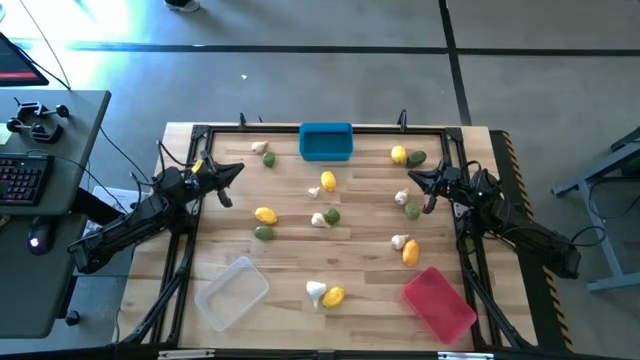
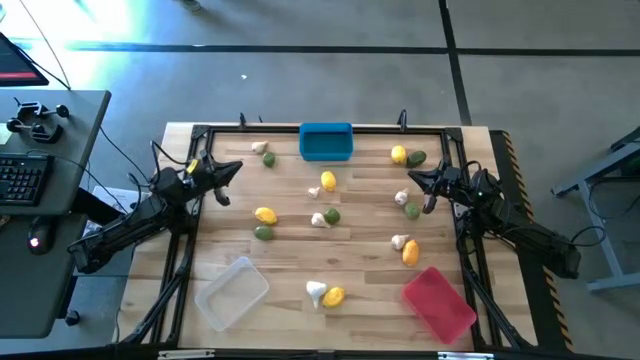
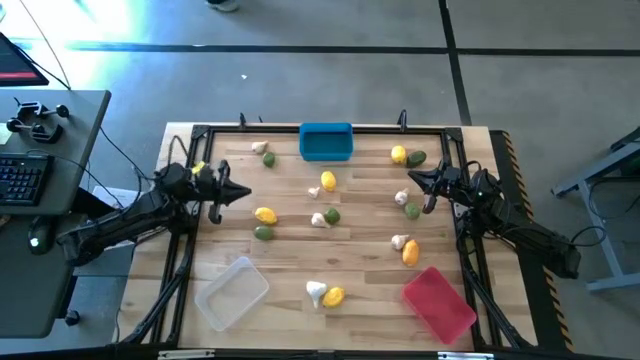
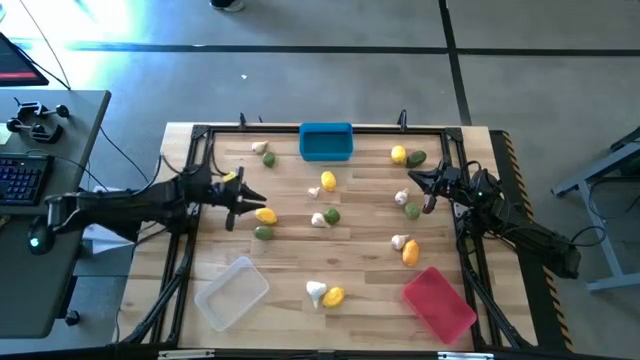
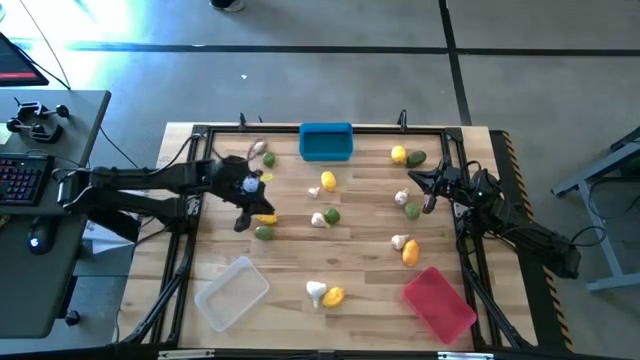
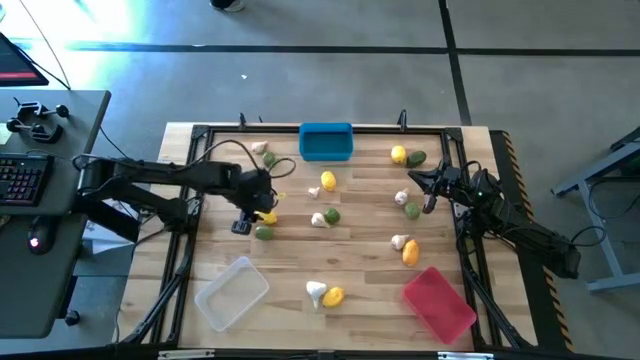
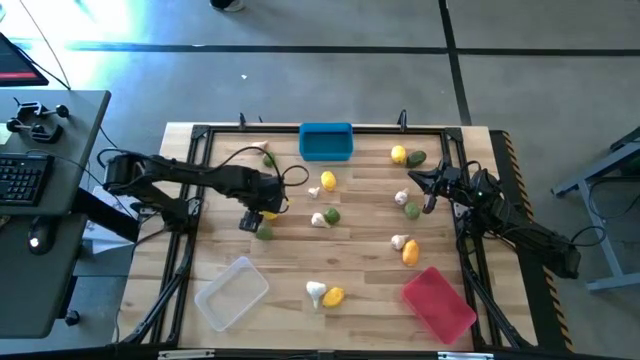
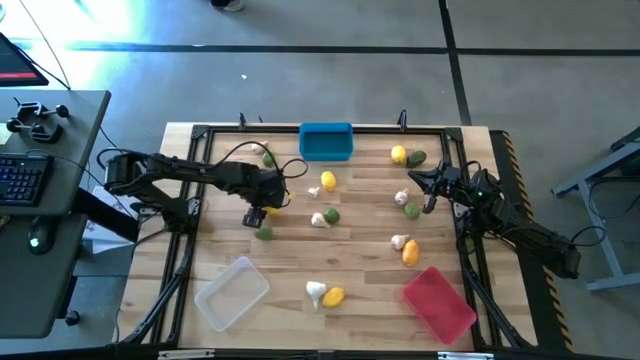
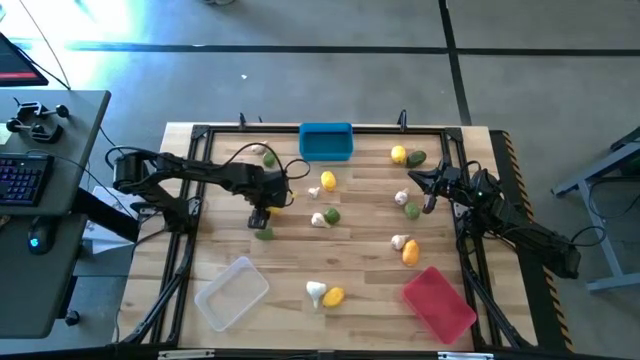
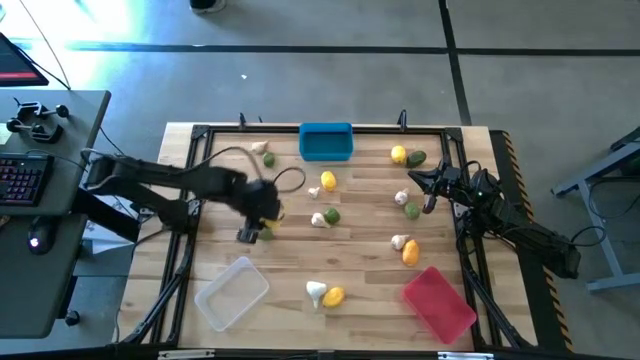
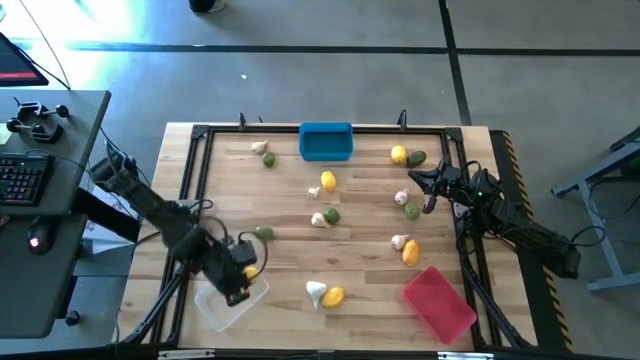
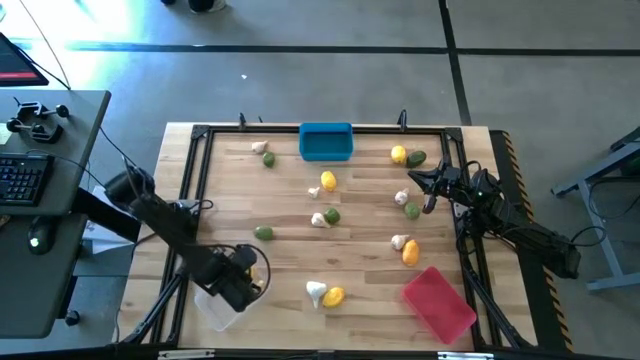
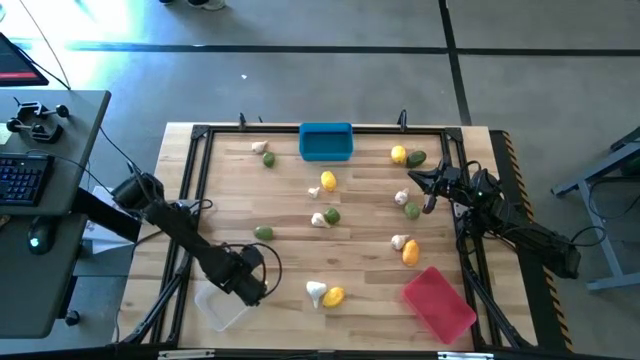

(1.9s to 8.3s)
Task: Sort produce into baskets
Put the lemon into the transparent bin

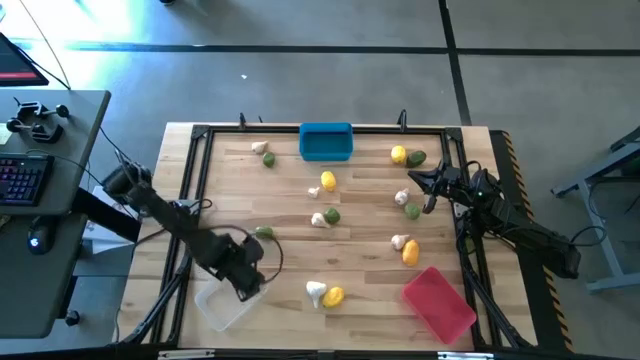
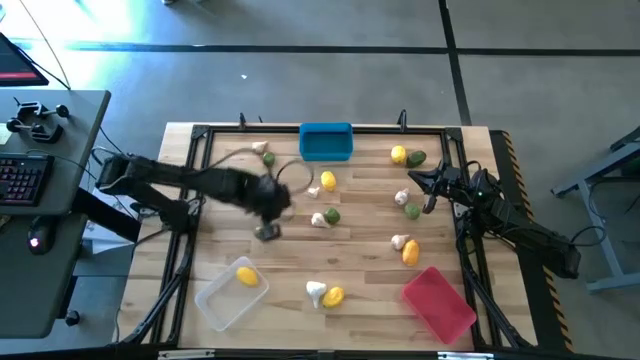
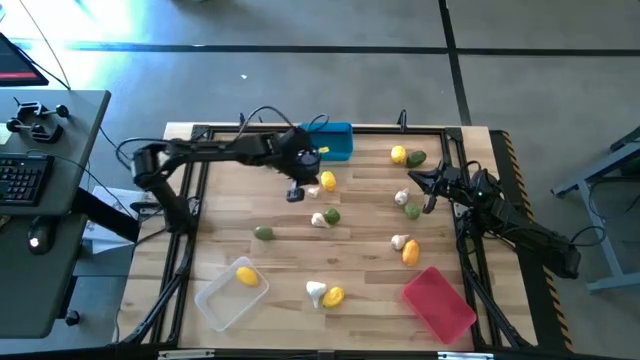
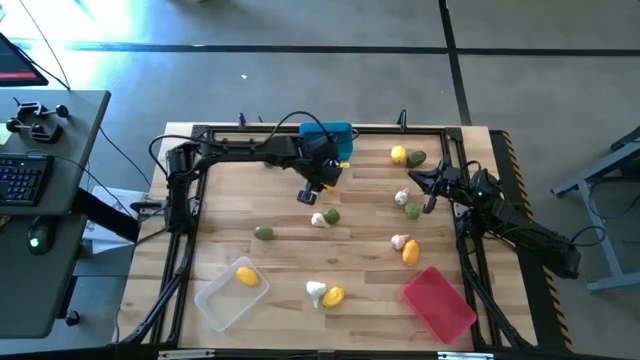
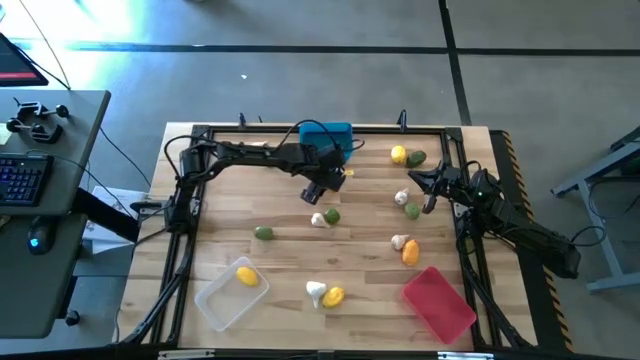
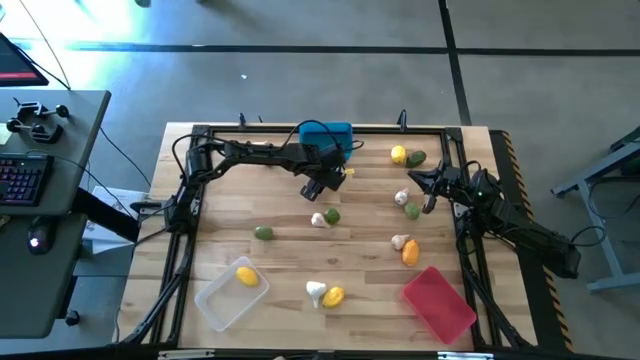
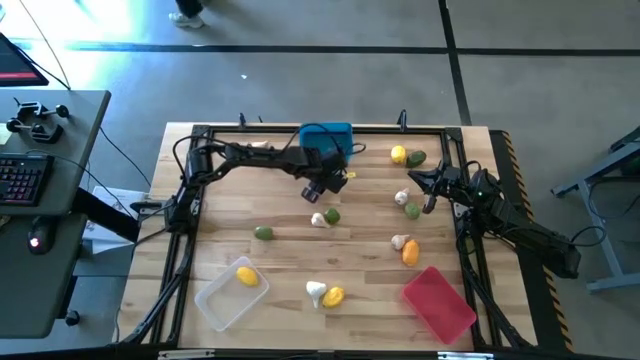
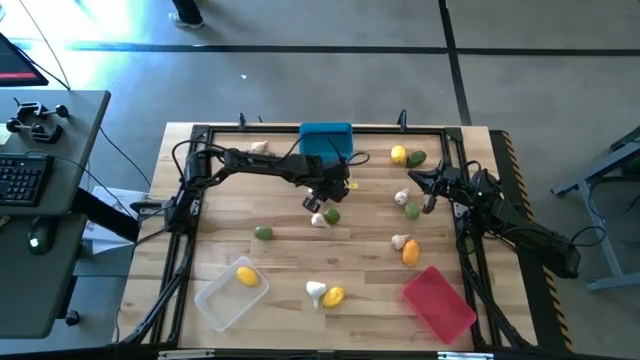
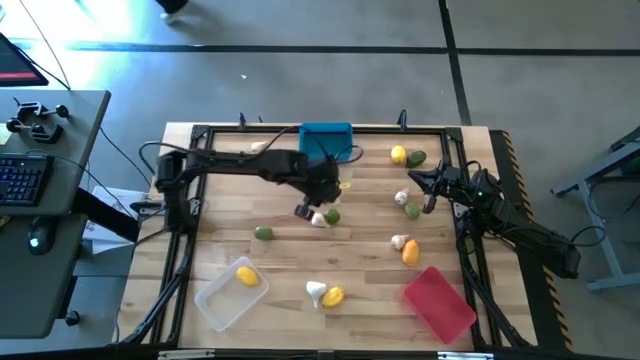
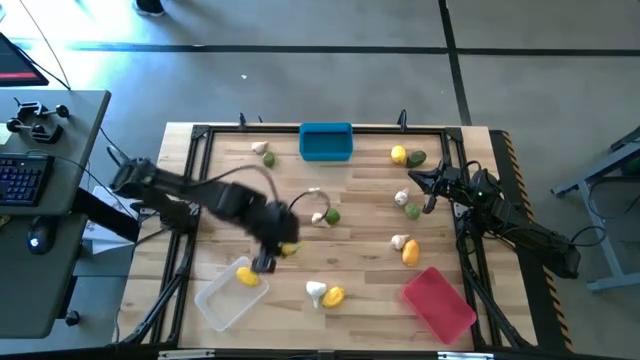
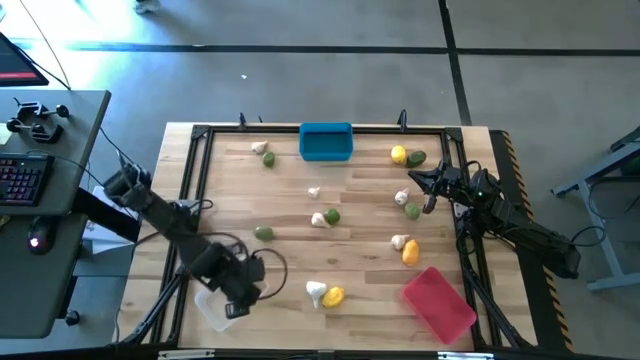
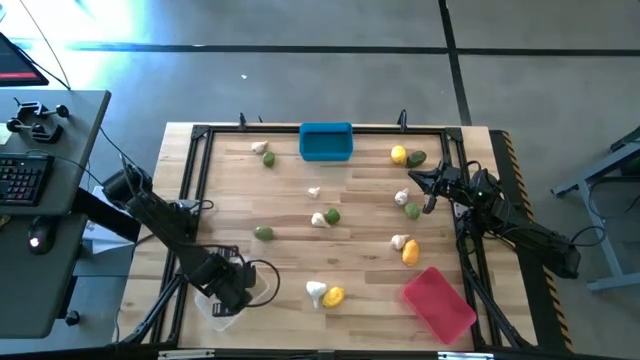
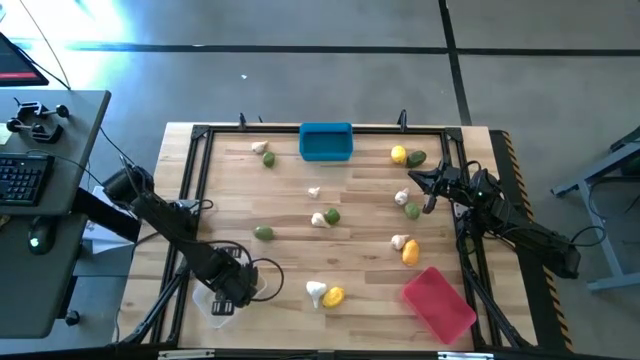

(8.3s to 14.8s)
Put the lemon into the transparent bin

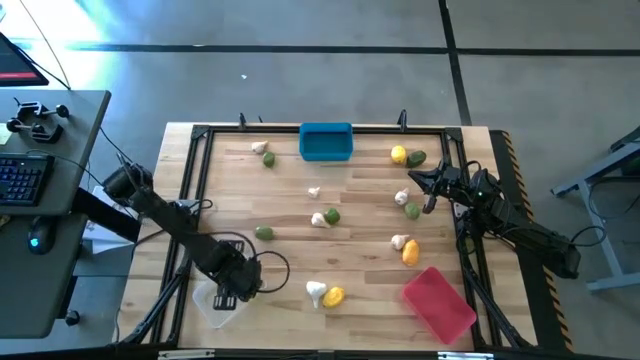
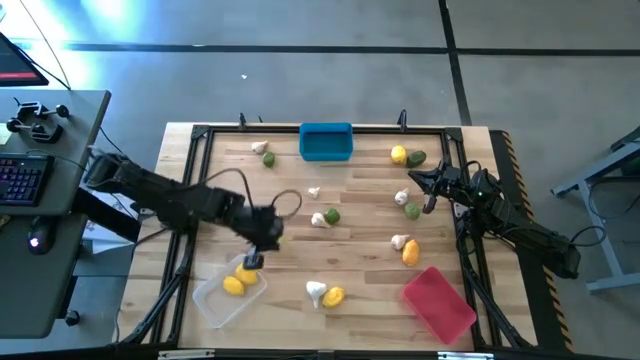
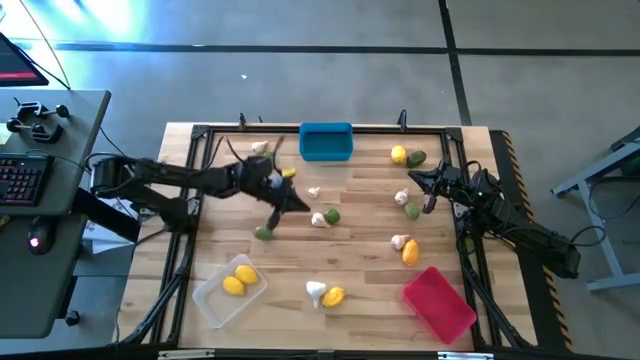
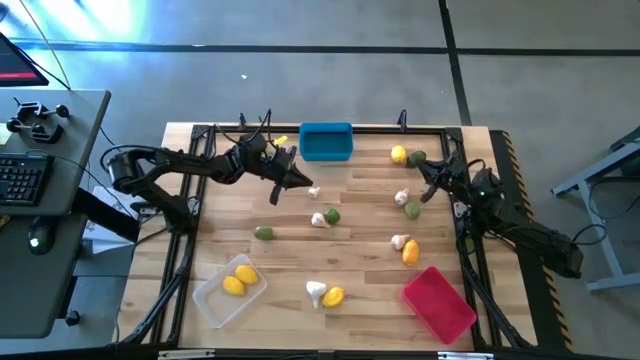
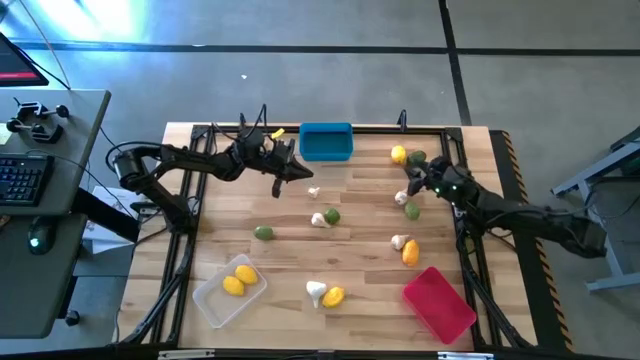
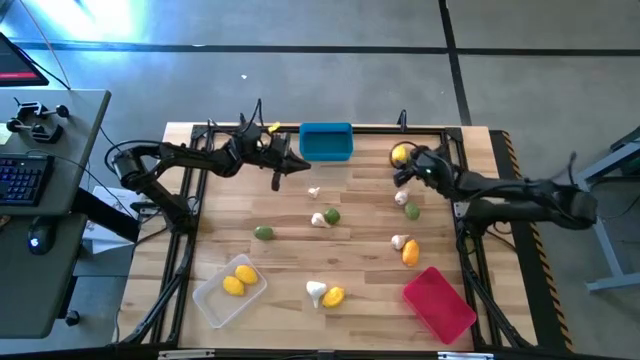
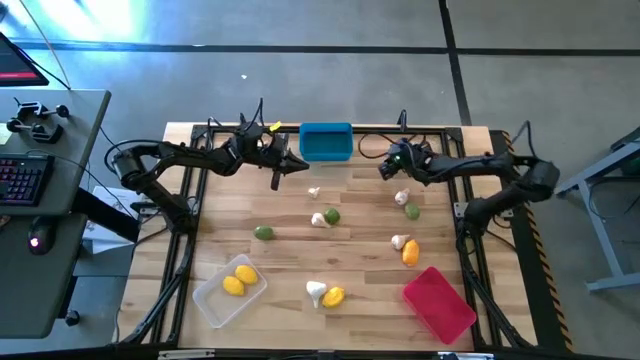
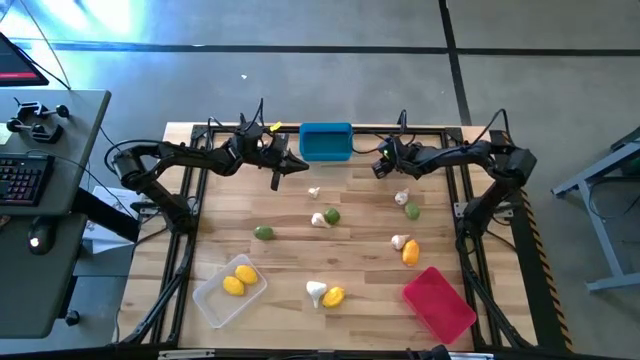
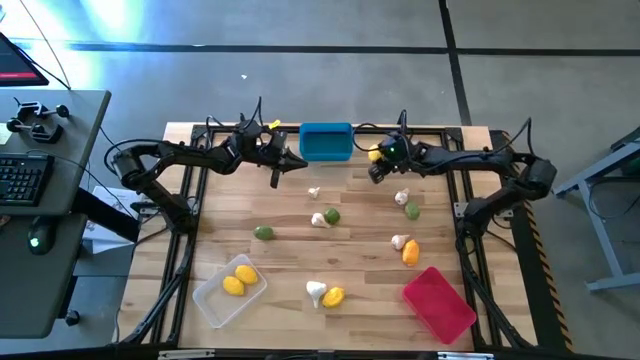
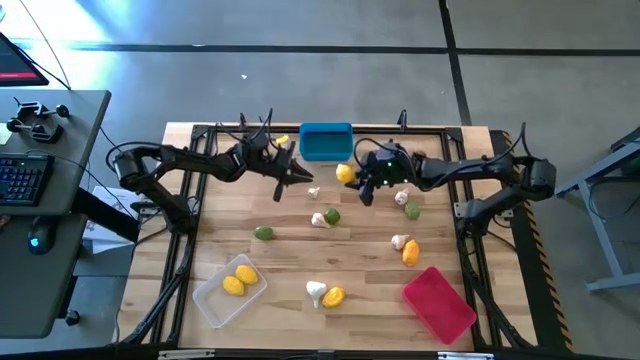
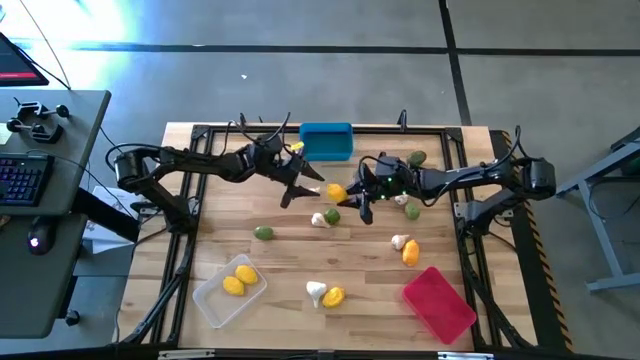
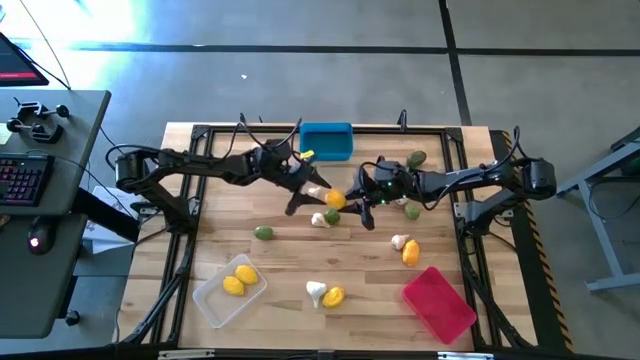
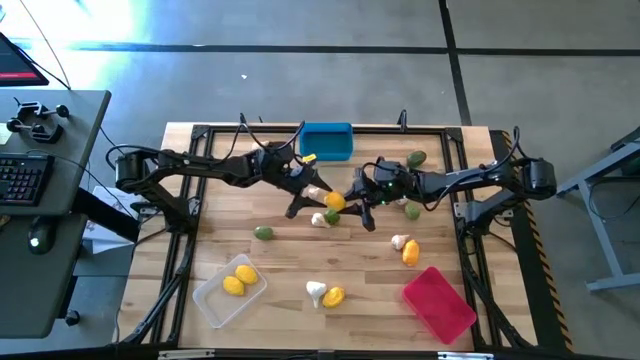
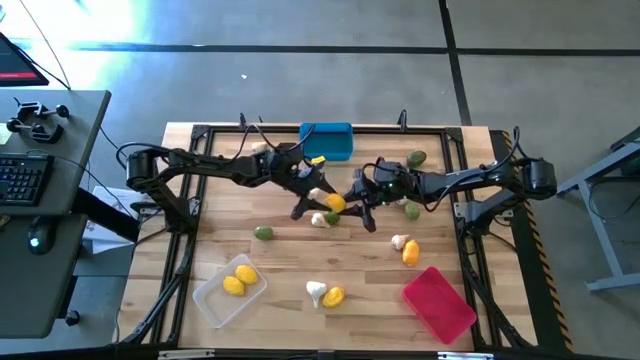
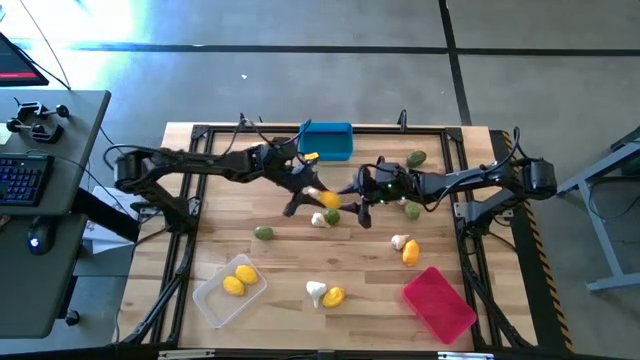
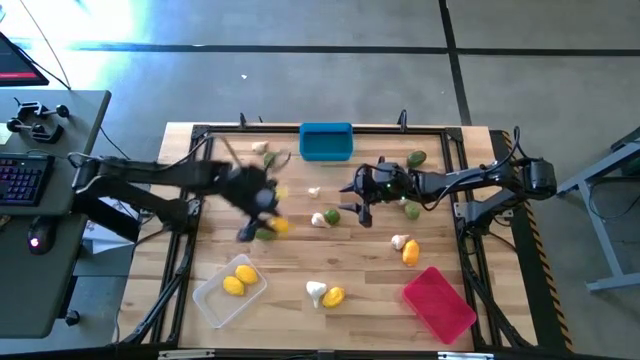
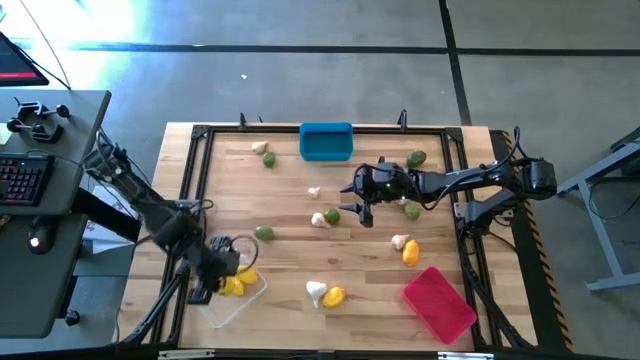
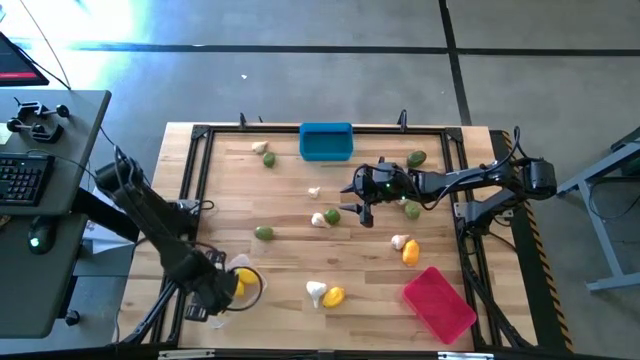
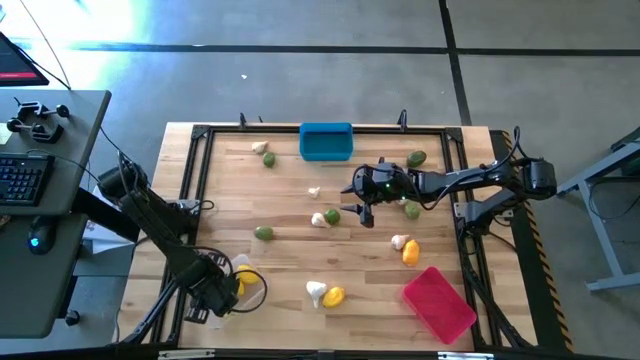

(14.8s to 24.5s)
Put the lemon into the transparent bin
